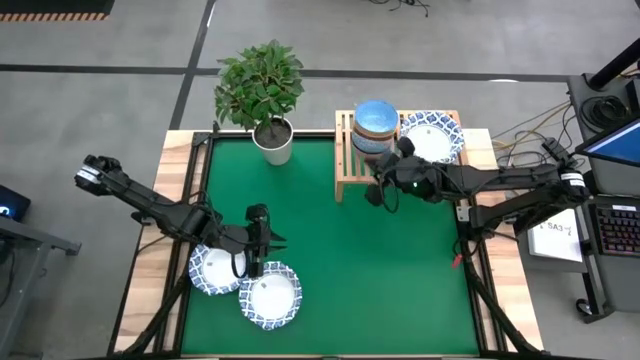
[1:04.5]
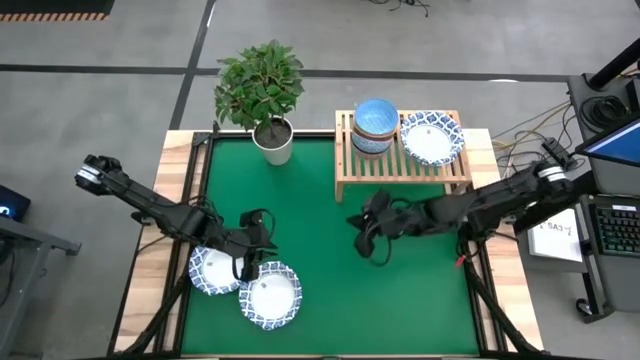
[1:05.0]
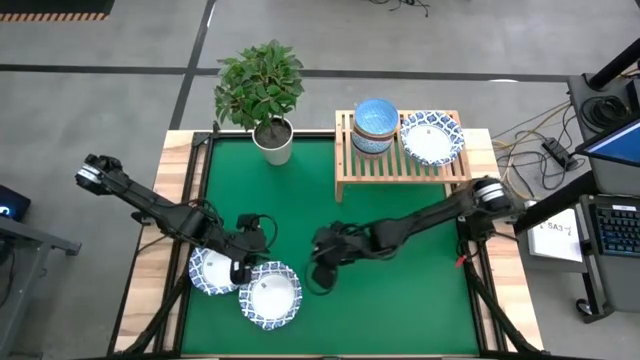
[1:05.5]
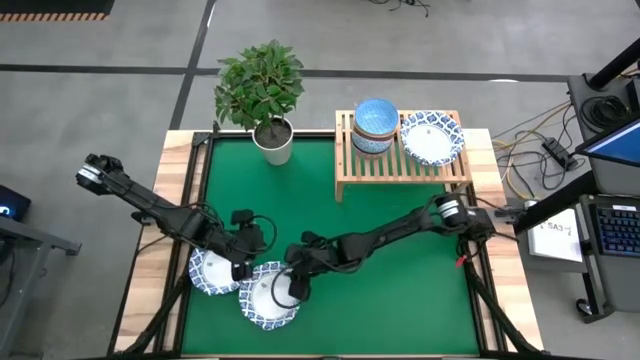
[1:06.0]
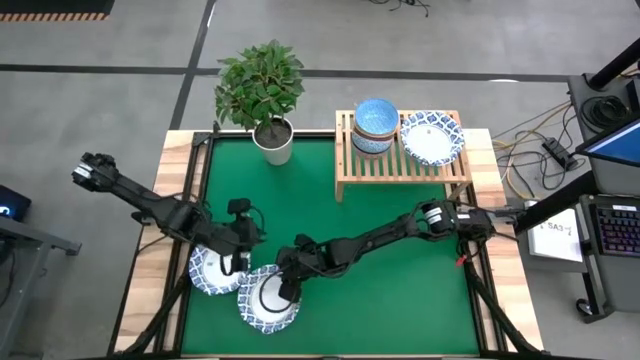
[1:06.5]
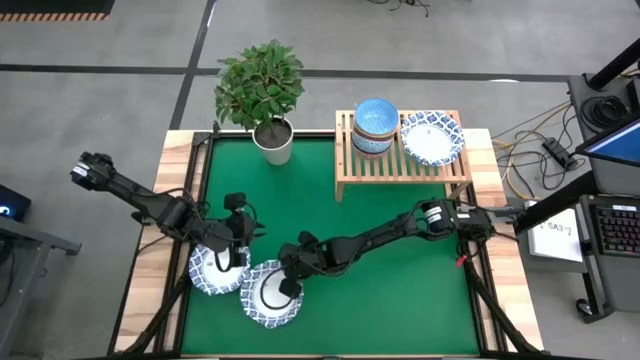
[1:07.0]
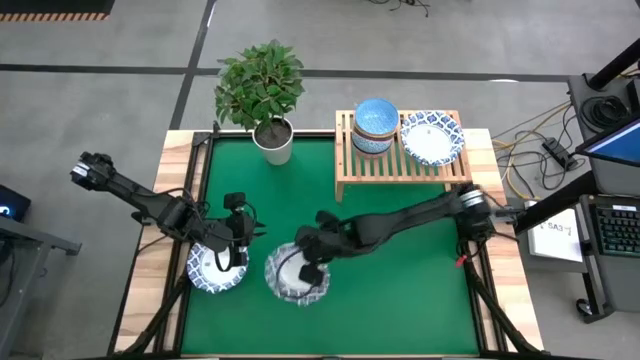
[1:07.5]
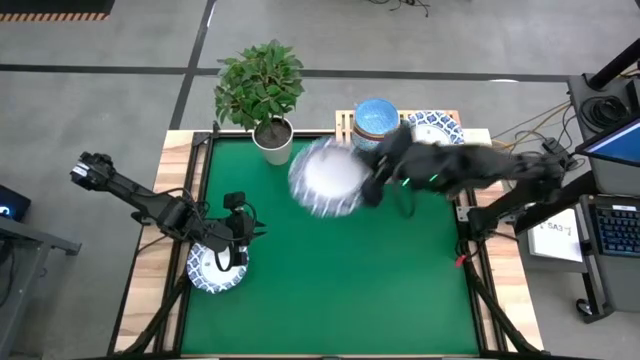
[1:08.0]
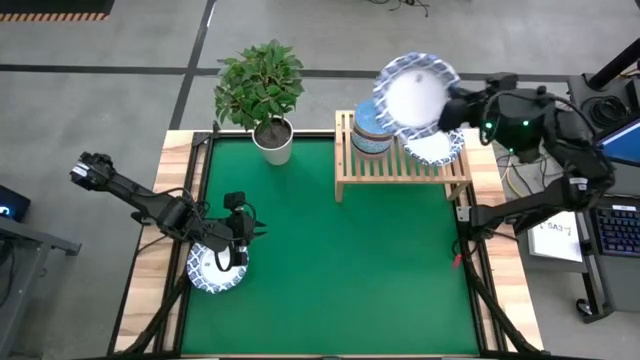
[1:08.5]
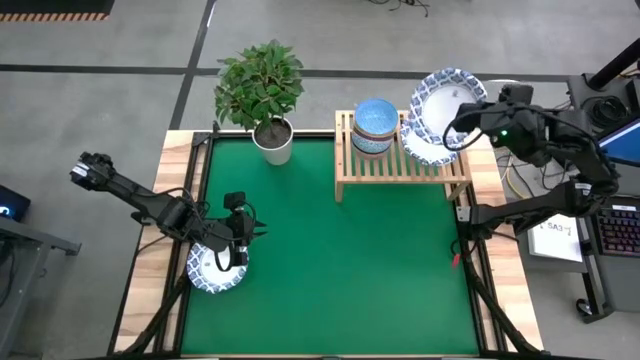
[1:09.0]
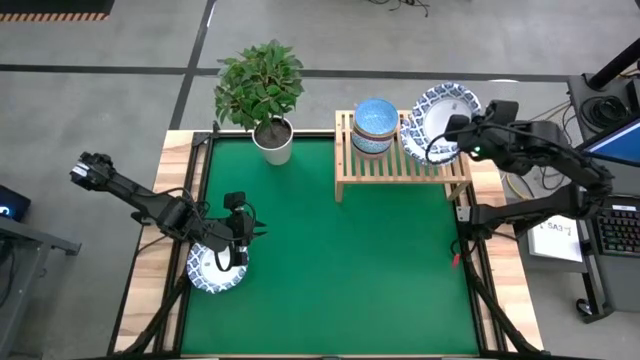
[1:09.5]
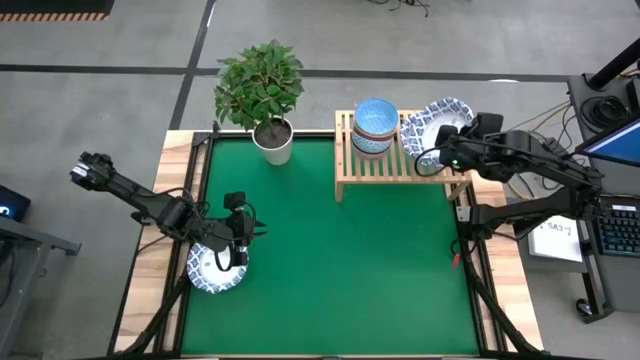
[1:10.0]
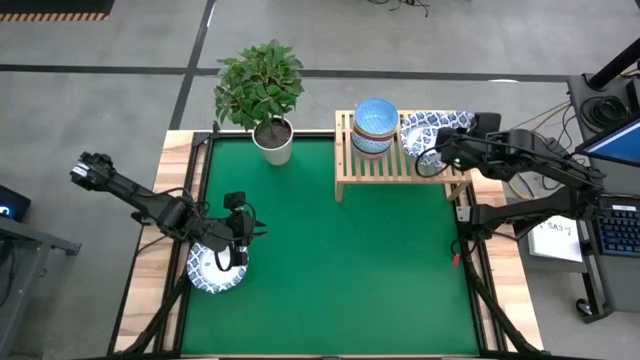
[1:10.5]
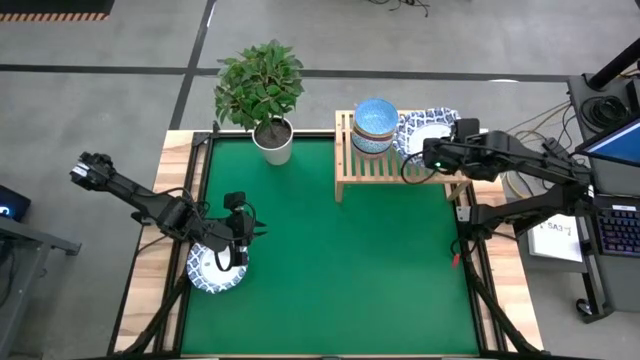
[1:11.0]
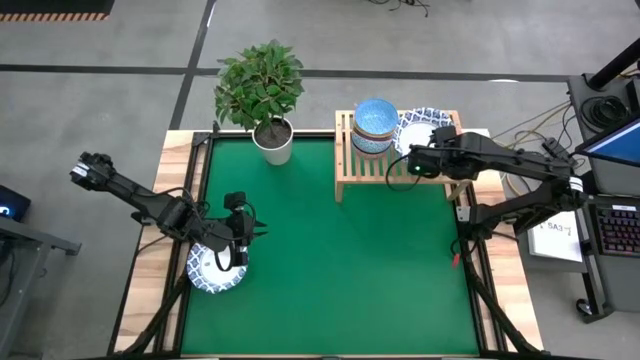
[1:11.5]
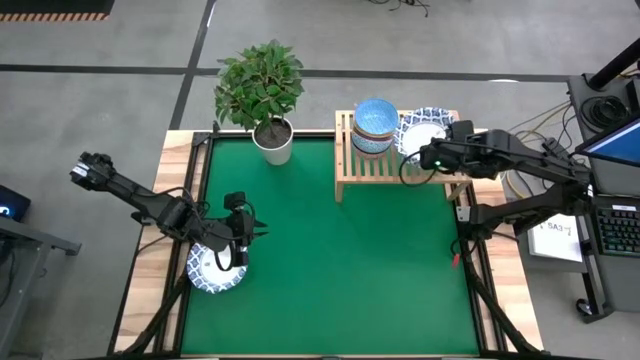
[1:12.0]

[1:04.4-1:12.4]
Task: Place and stack bowls onto a shelf
Stack the white patterned bowl on top of the white patterned bowl on the shelf

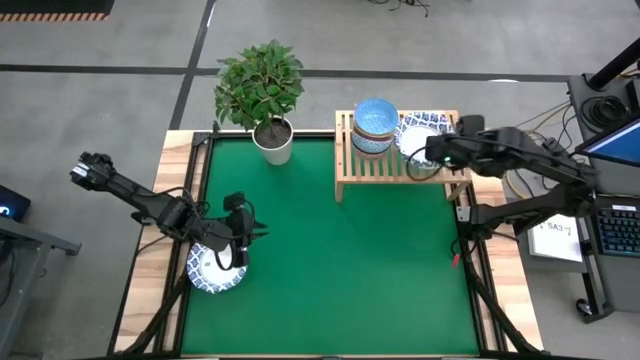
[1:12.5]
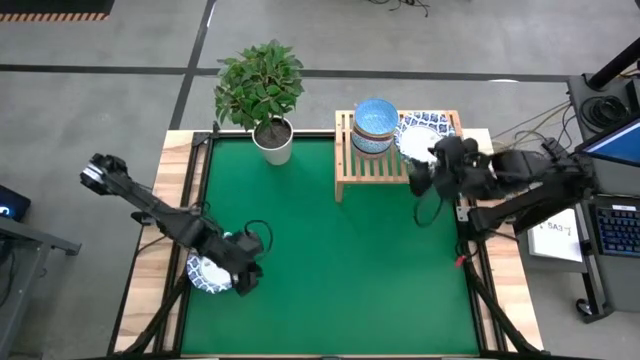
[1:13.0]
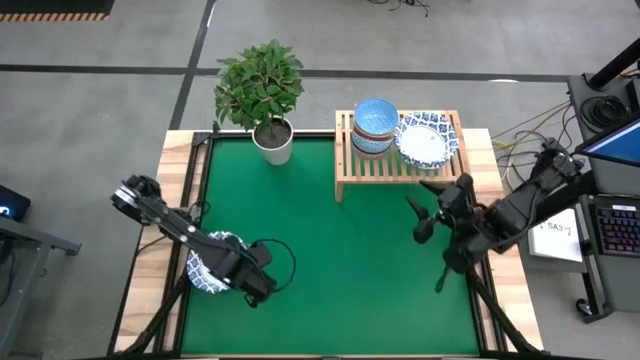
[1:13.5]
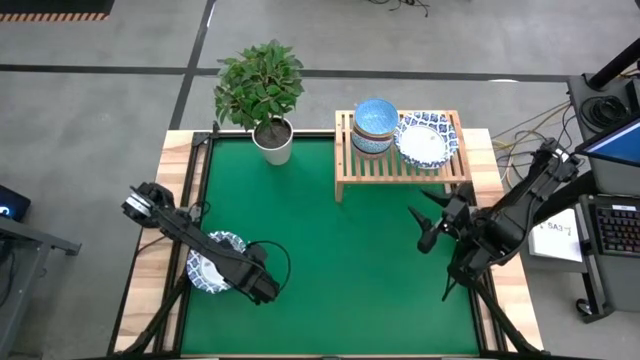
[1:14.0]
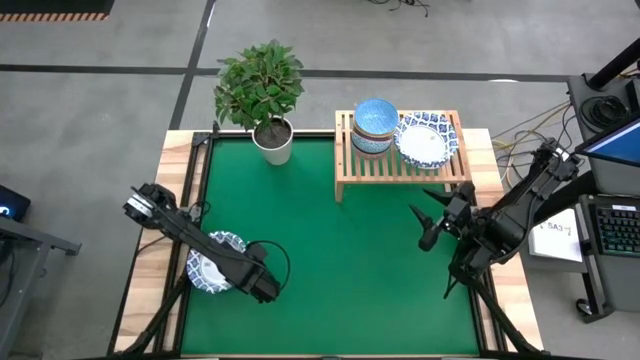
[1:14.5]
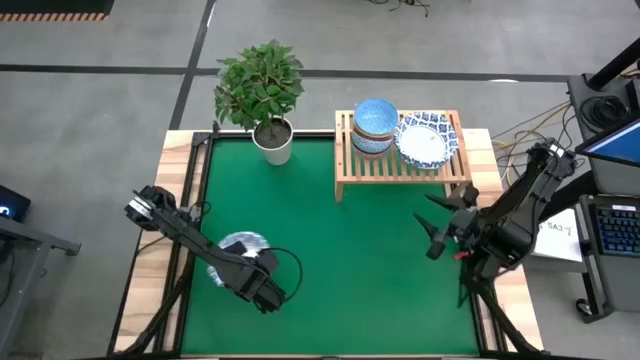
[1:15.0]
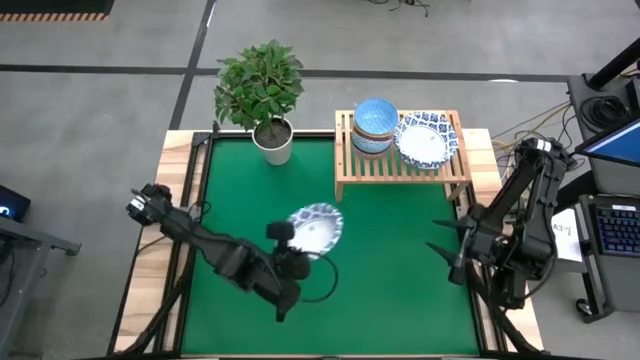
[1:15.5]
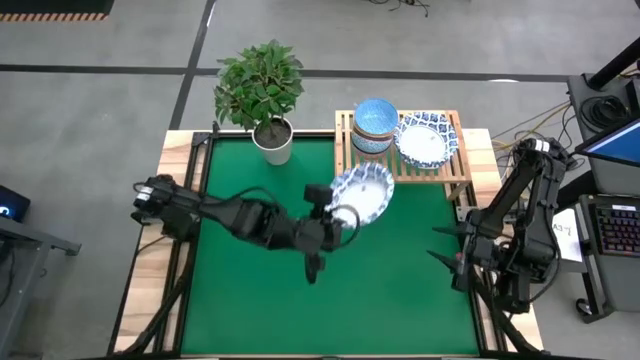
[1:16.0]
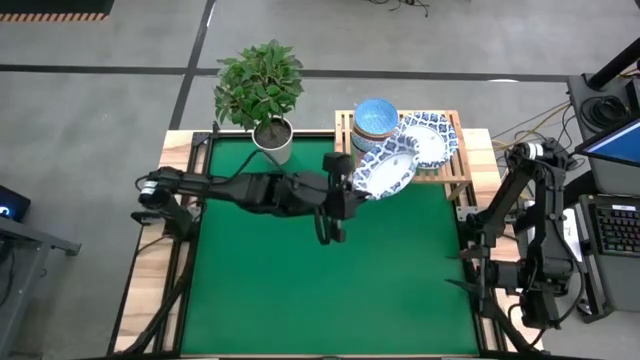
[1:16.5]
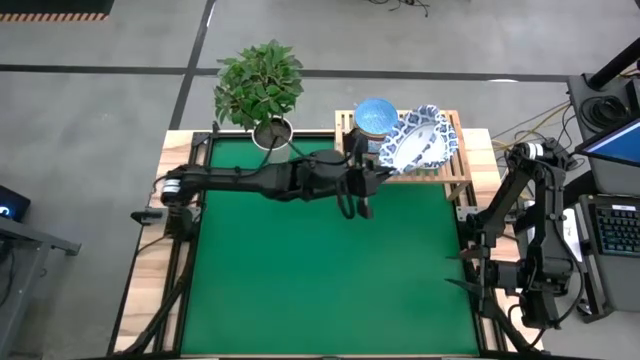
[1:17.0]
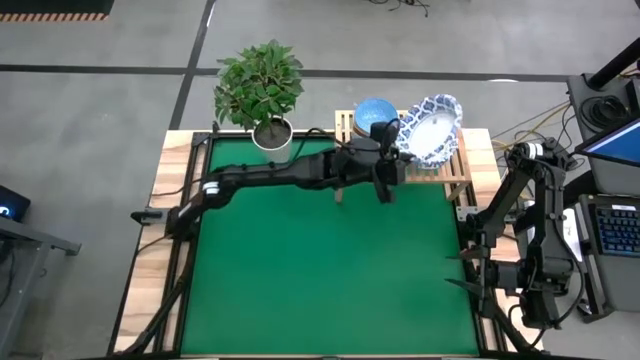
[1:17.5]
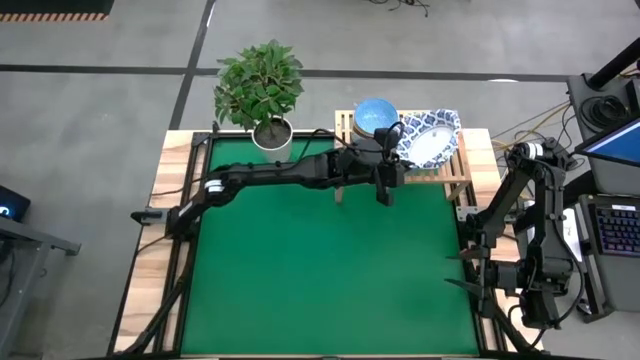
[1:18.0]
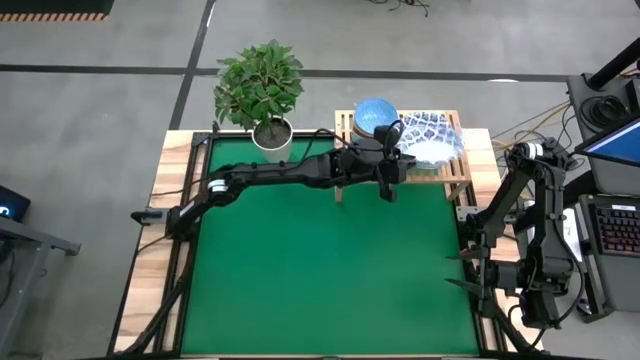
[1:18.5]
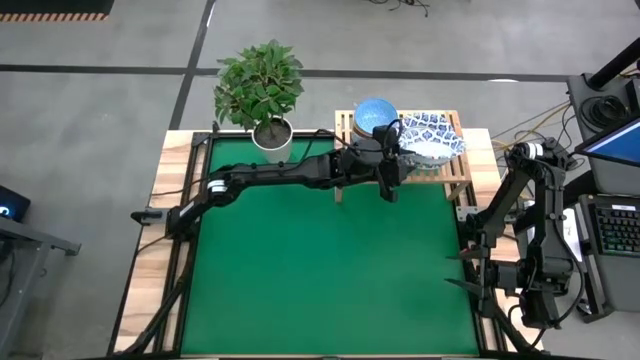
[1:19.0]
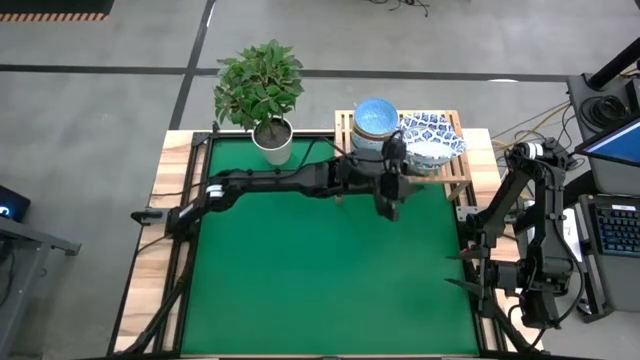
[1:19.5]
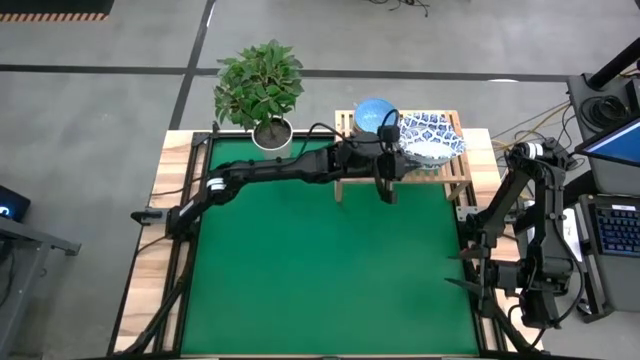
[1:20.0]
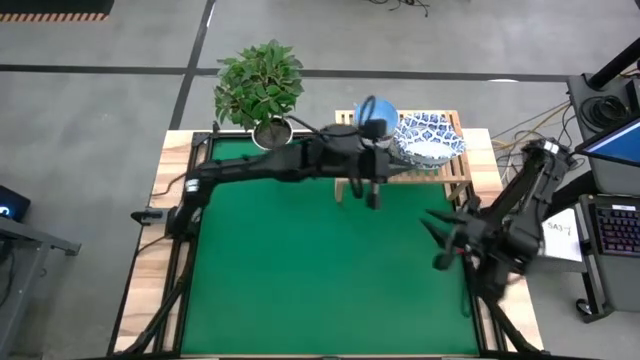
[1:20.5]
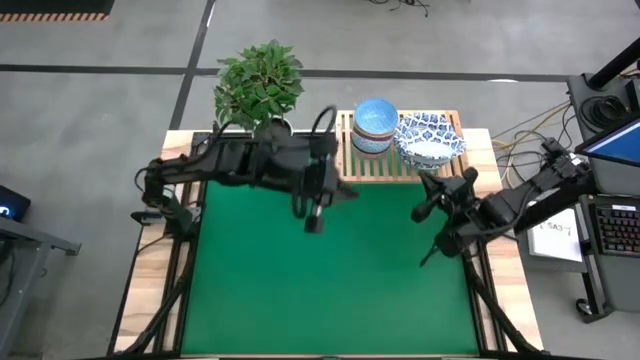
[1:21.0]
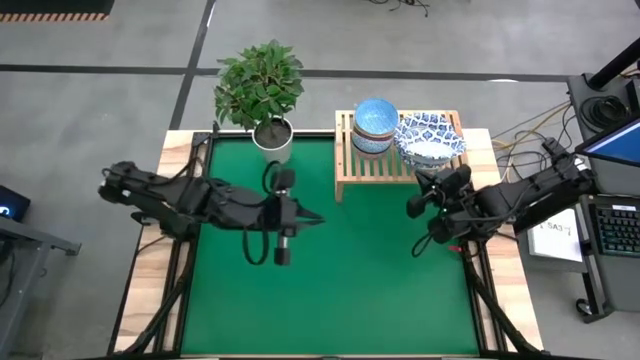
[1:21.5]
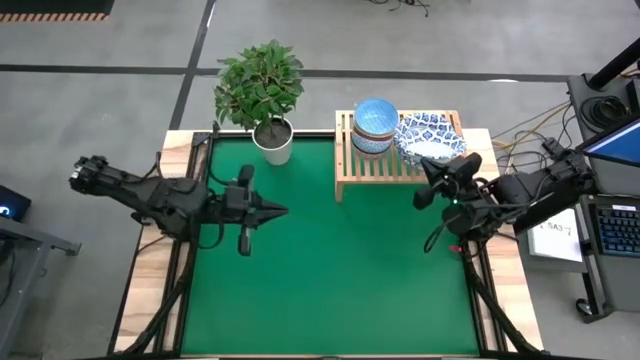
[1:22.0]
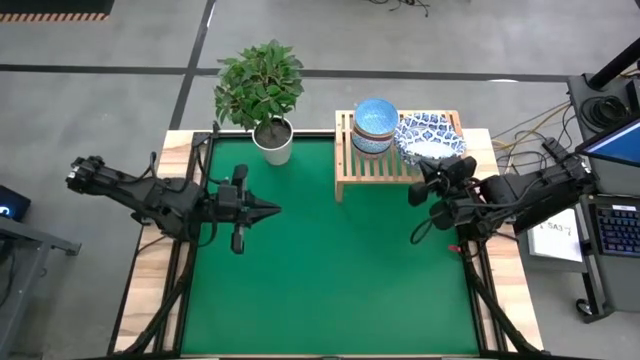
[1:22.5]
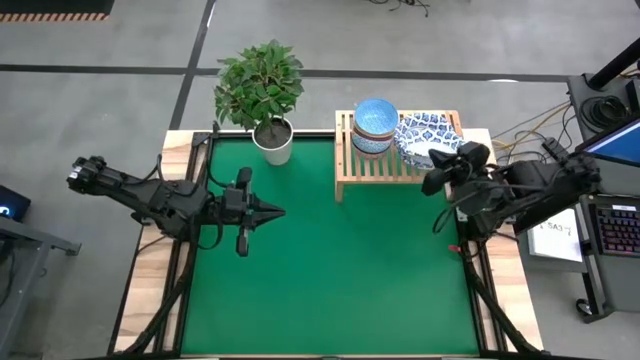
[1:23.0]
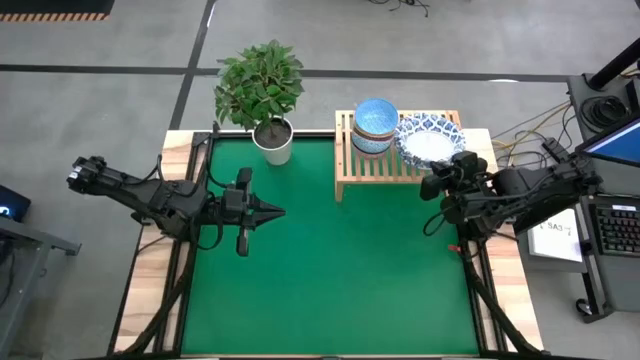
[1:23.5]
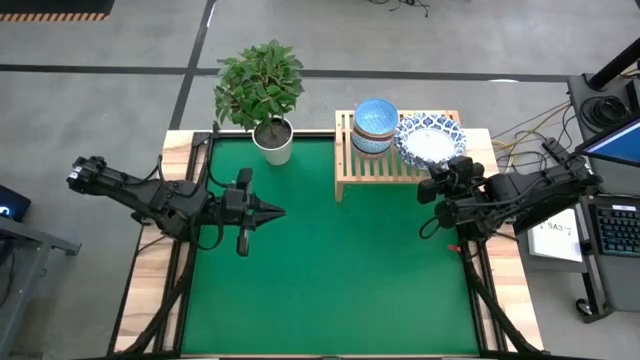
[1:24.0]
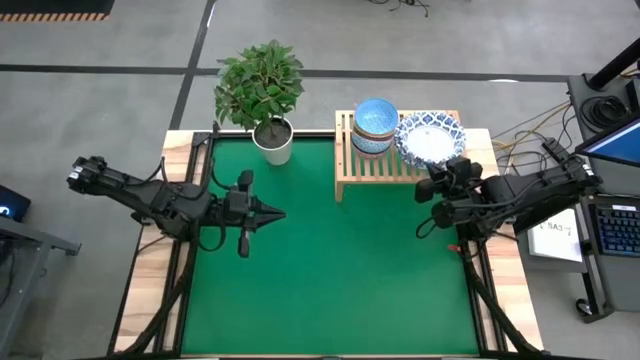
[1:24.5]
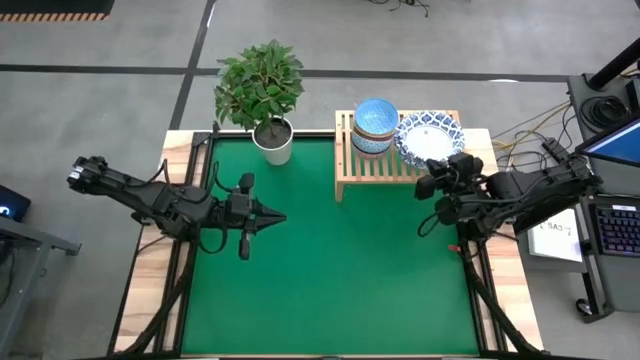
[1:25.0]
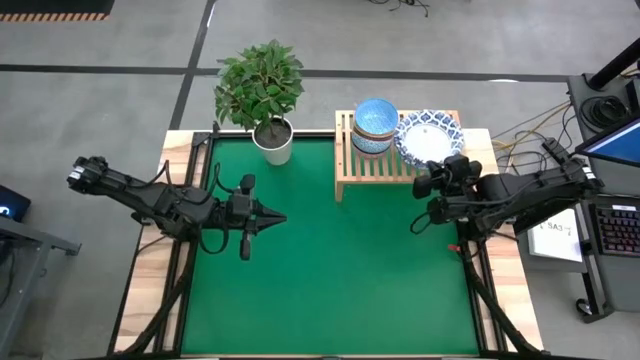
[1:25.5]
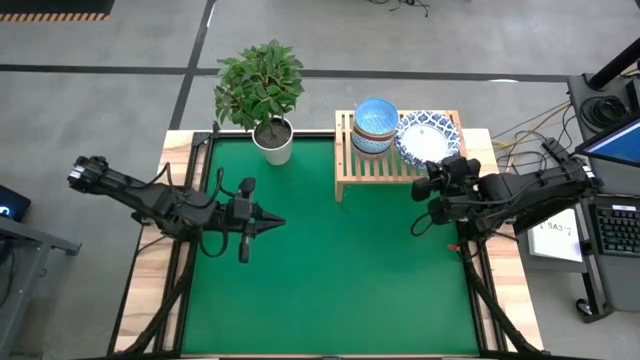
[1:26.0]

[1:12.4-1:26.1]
Stack the white patterned bowl on top of the white patterned bowl on the shelf
